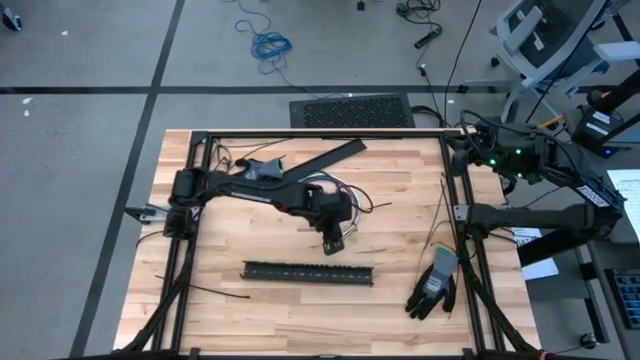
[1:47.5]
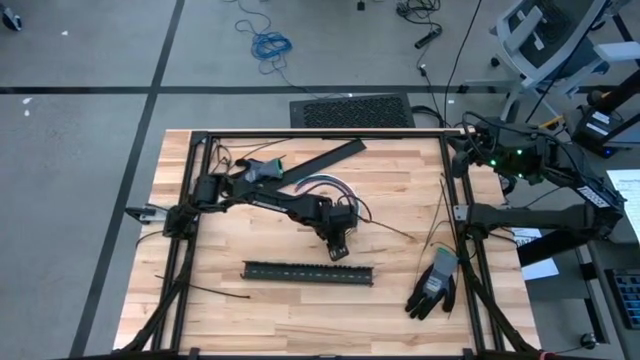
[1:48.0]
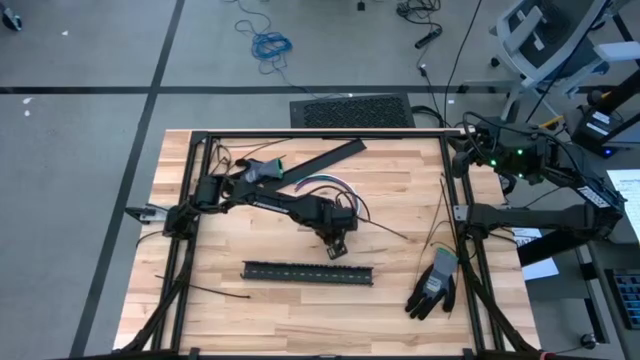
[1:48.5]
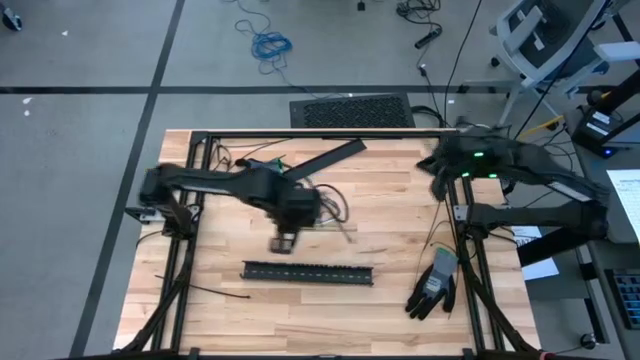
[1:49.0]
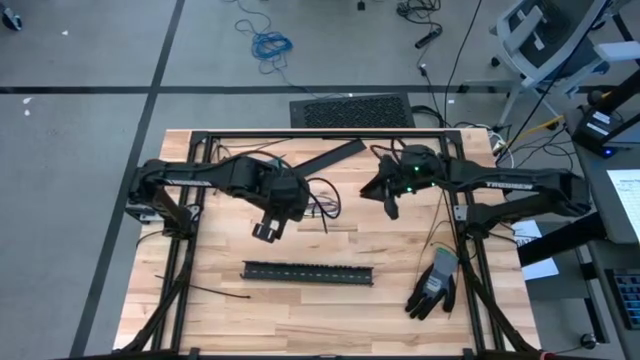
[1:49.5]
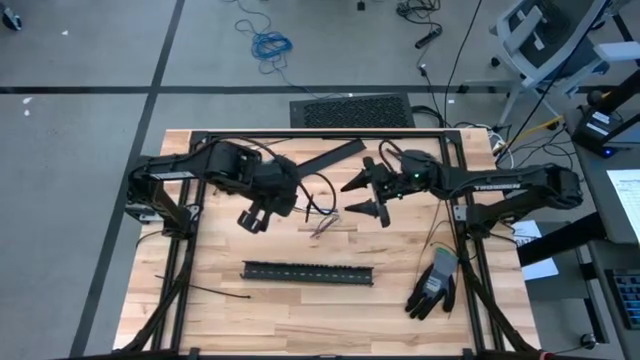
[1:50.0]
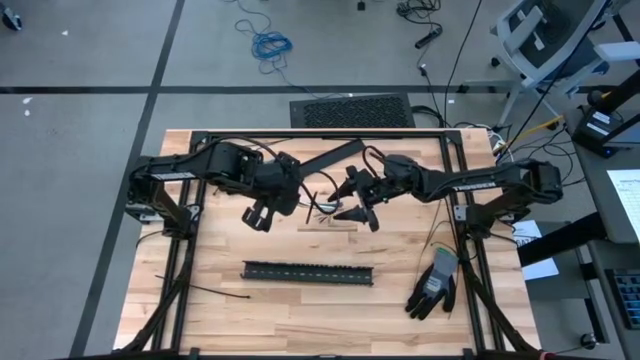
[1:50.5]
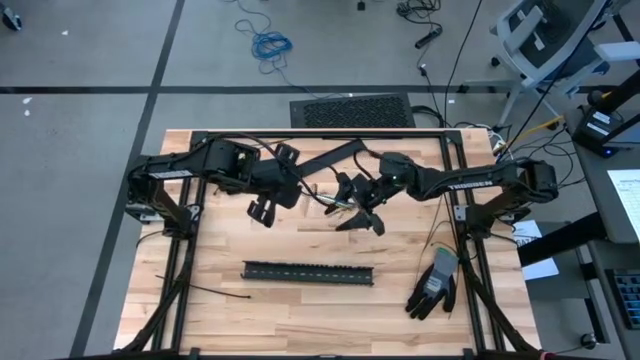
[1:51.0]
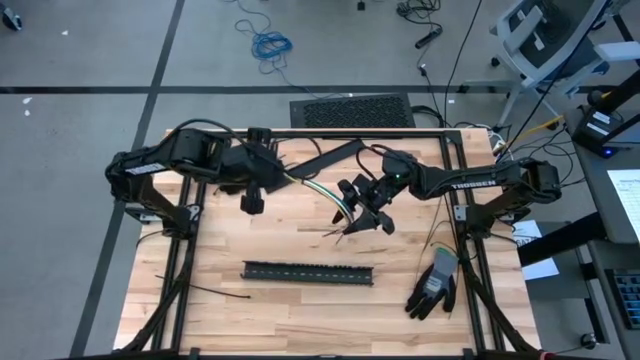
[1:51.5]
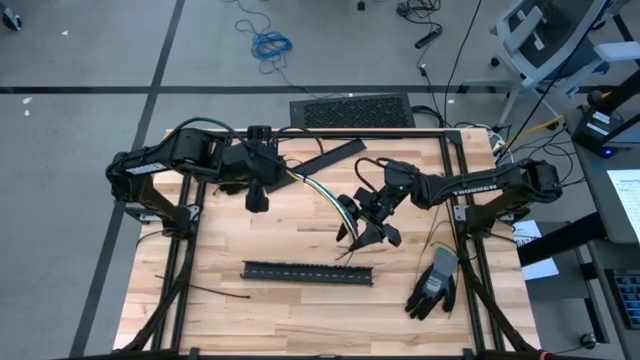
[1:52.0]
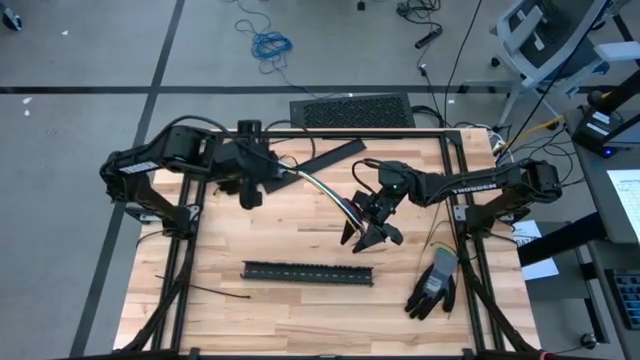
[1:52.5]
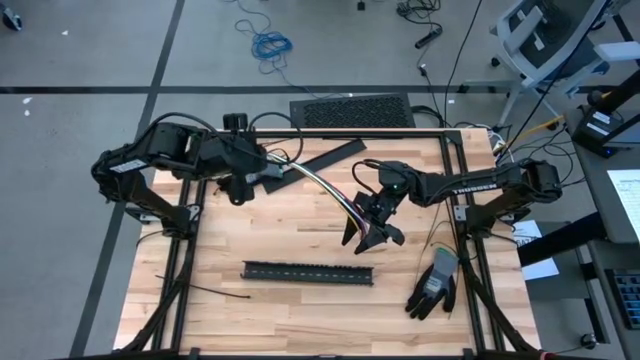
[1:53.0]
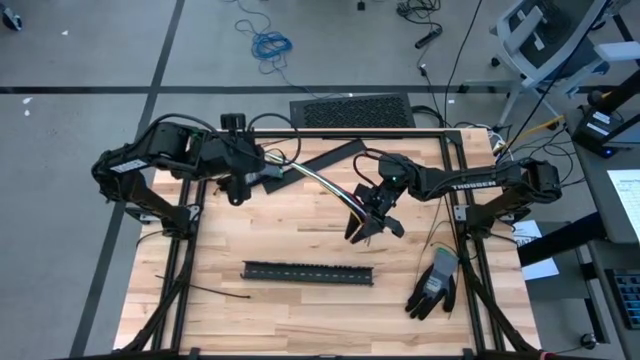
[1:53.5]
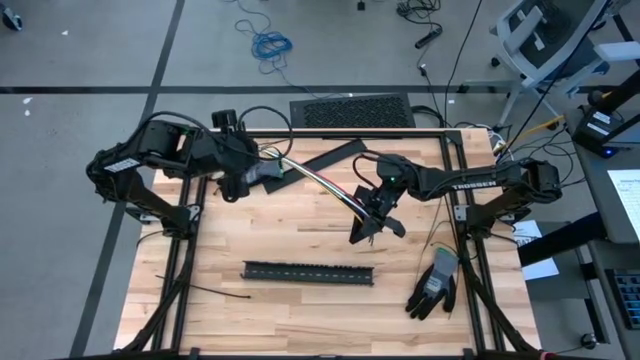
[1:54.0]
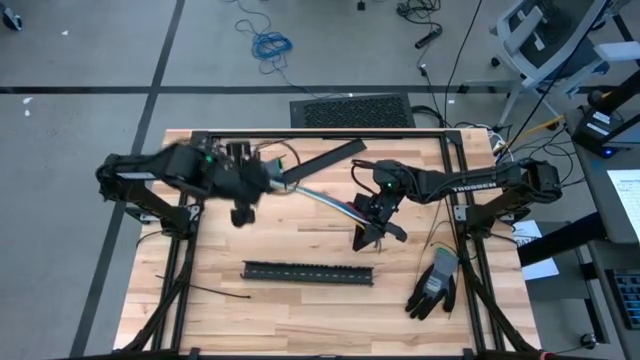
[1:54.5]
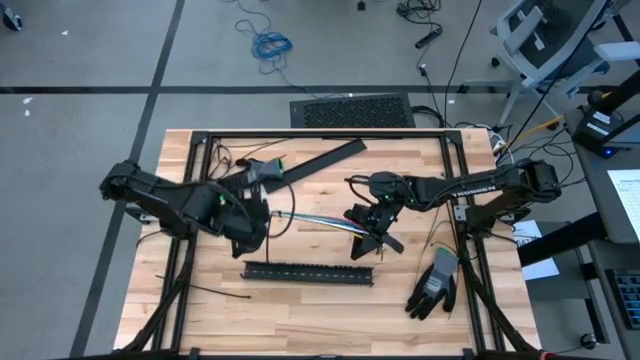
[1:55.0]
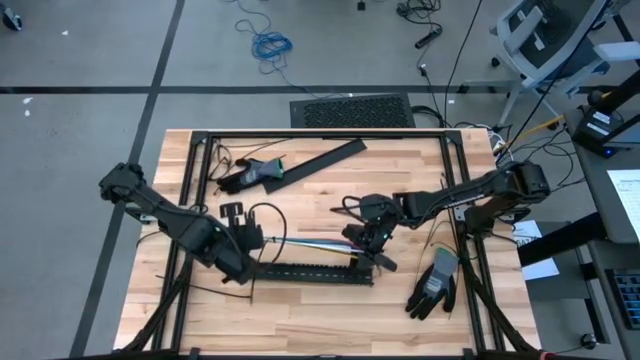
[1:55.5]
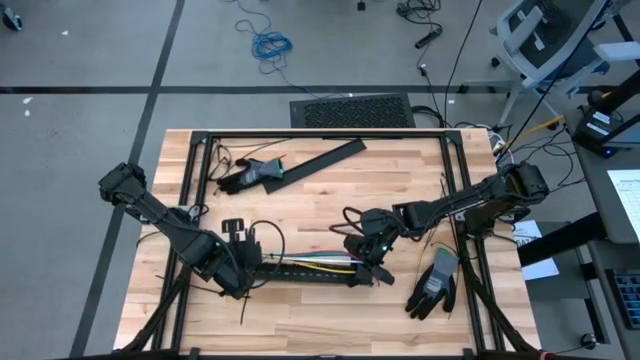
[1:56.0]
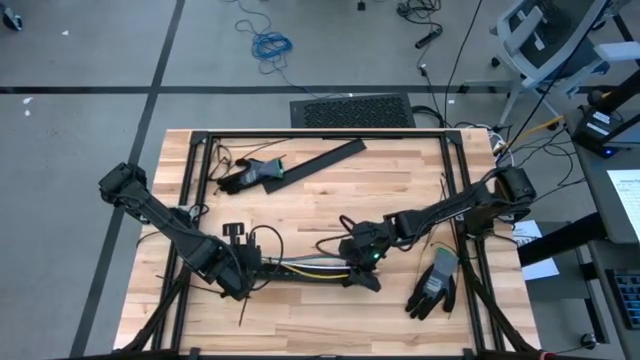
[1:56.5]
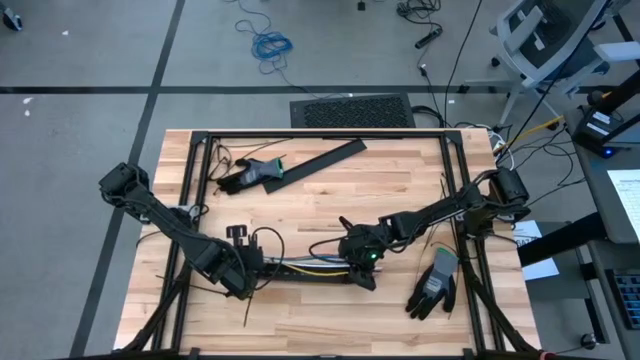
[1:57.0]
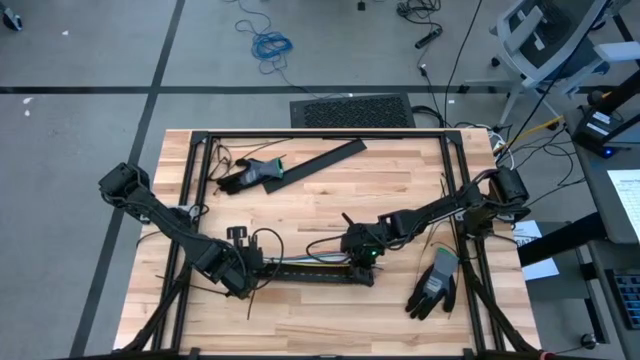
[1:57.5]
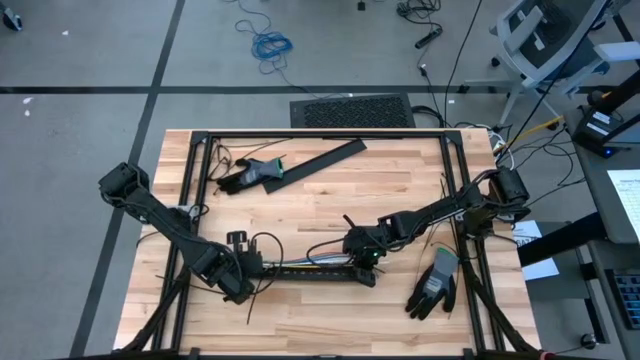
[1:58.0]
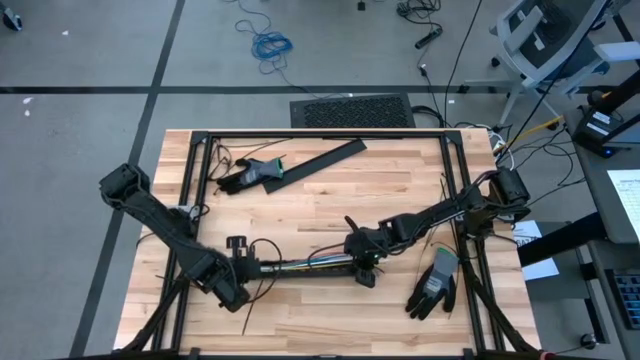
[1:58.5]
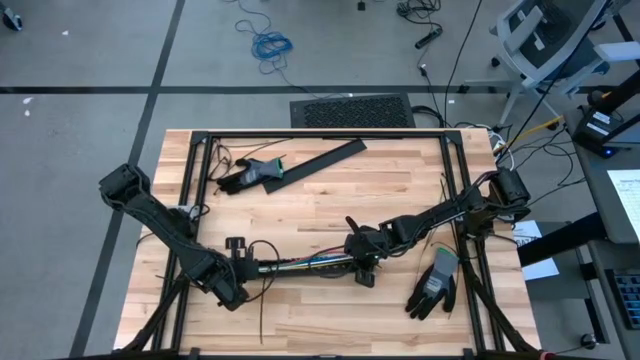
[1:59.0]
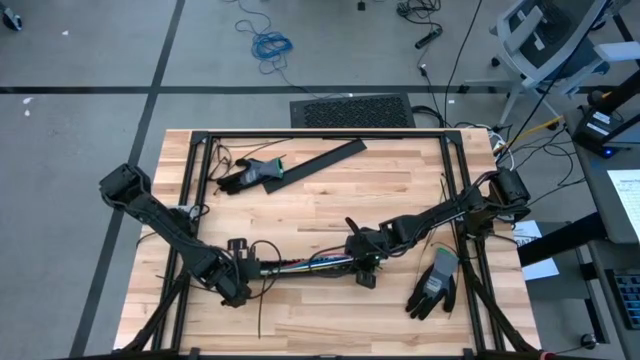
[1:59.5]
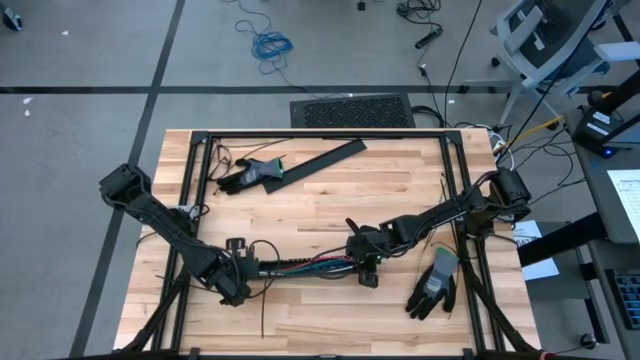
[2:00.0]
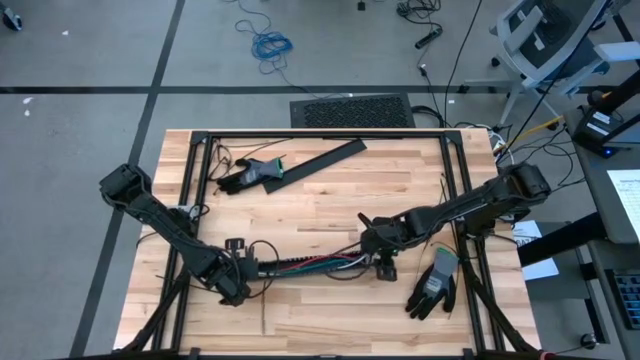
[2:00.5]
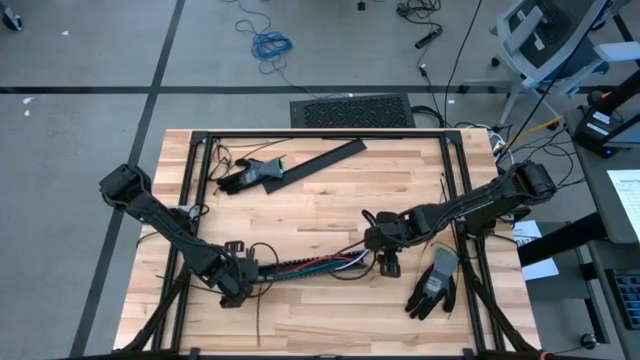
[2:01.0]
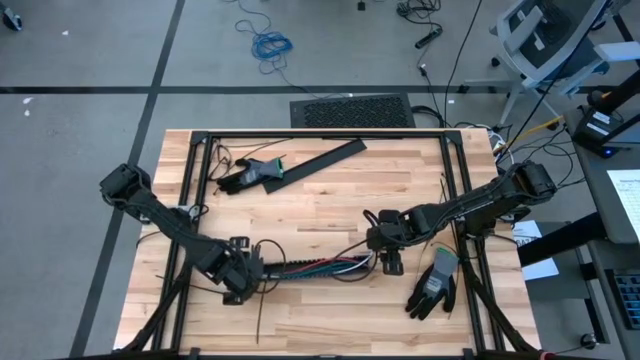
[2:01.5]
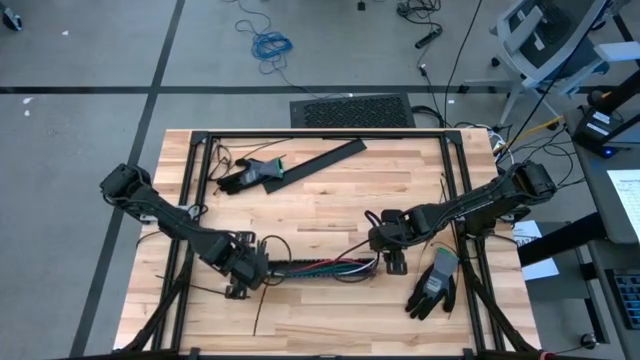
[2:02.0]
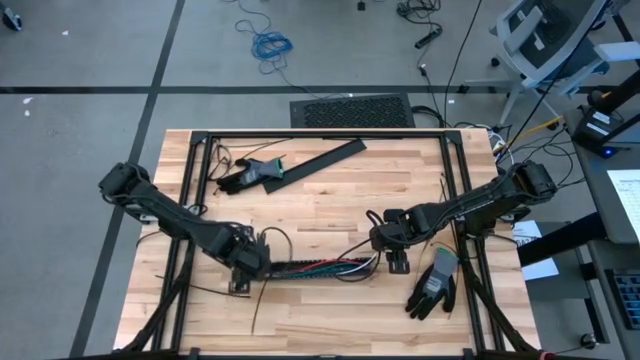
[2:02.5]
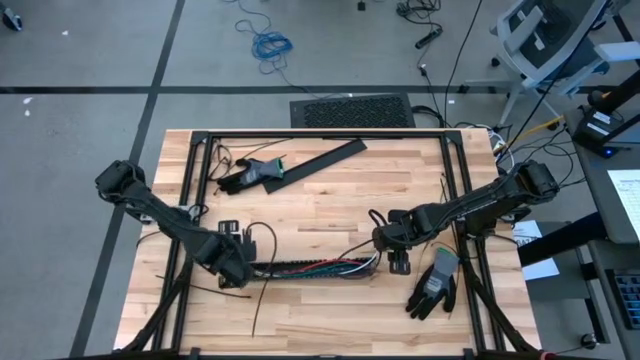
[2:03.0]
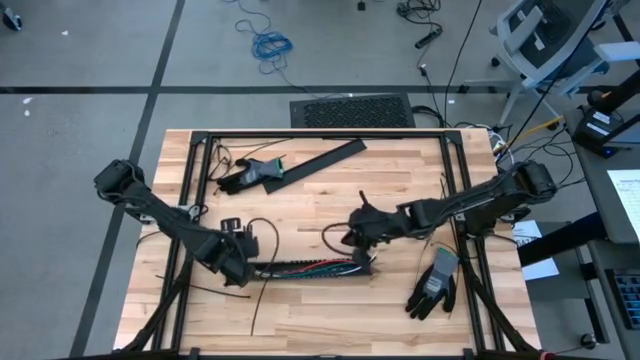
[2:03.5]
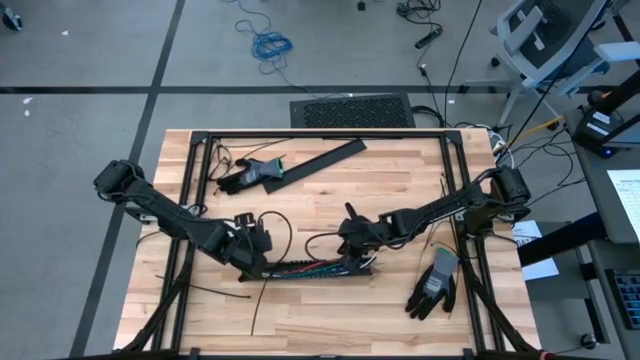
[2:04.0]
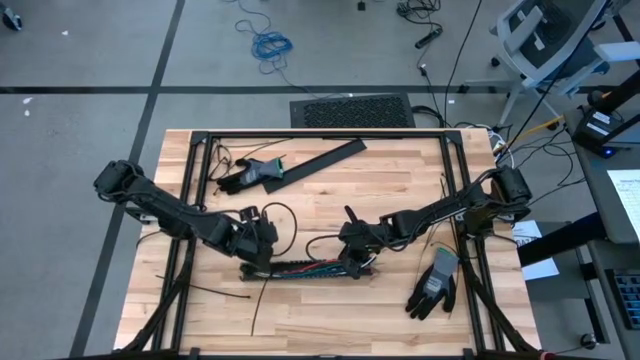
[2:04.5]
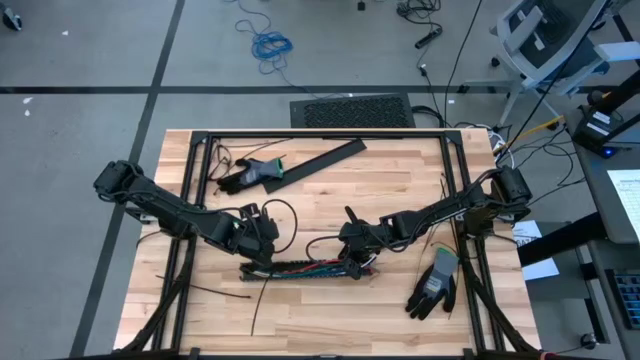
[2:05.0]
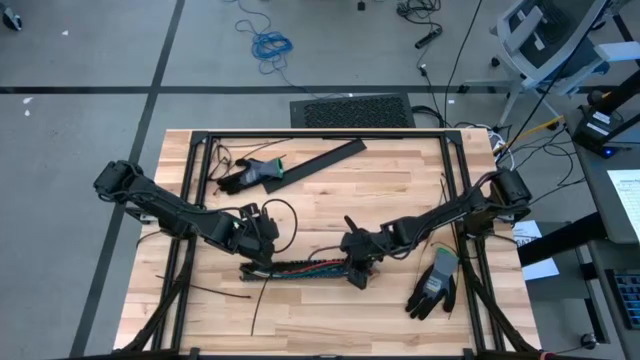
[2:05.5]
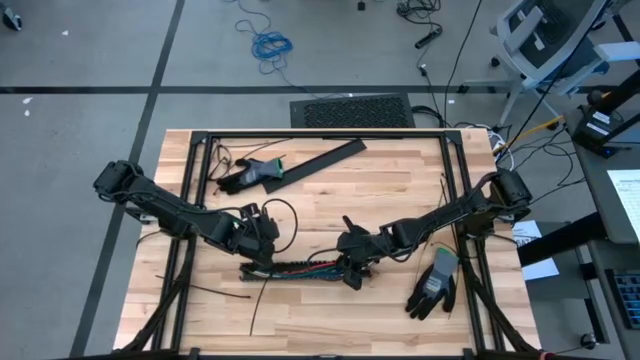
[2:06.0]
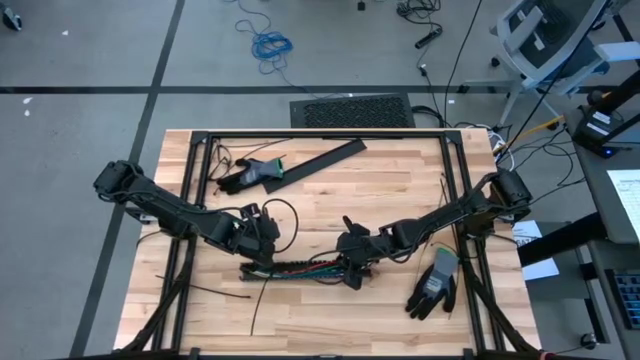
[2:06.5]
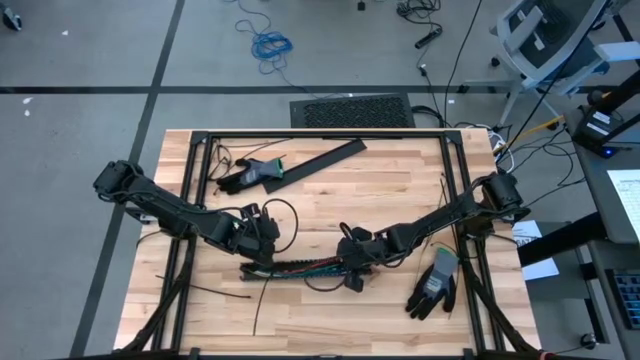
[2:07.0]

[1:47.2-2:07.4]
Task: Ziptie cables
Put the cable wires into the black cable duct

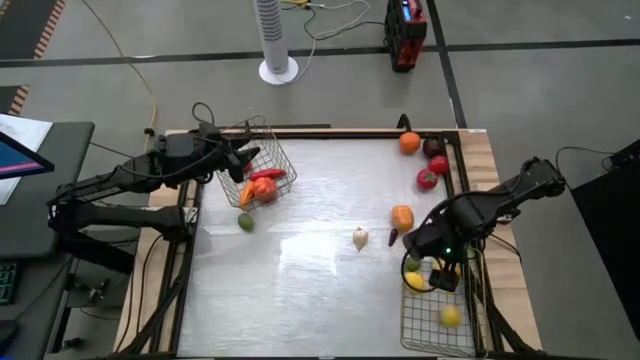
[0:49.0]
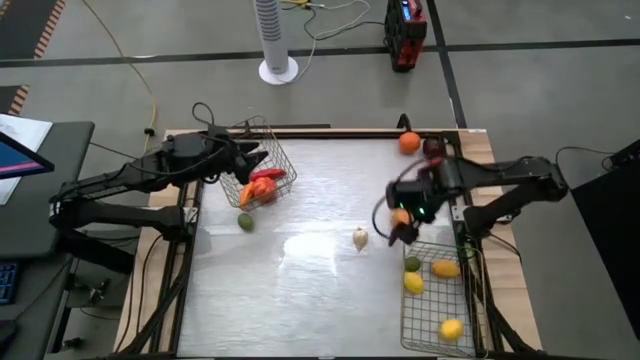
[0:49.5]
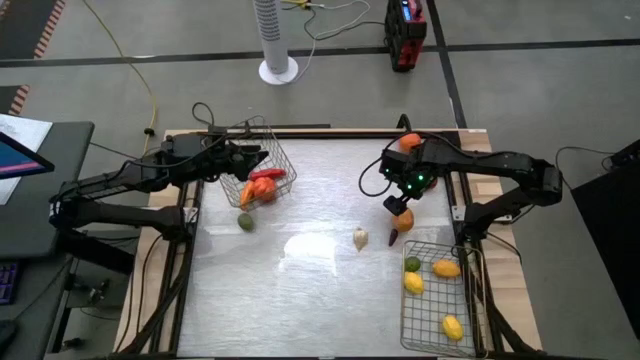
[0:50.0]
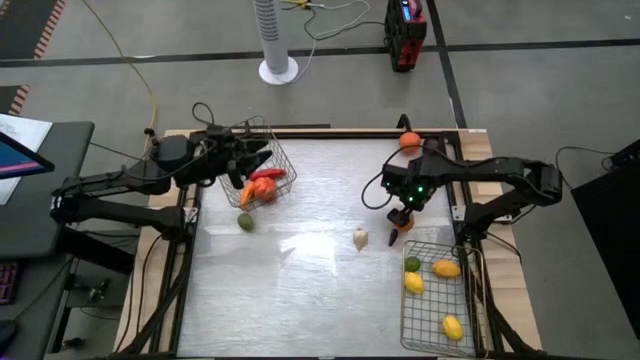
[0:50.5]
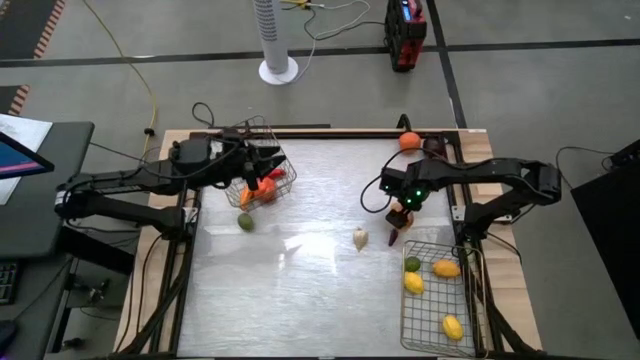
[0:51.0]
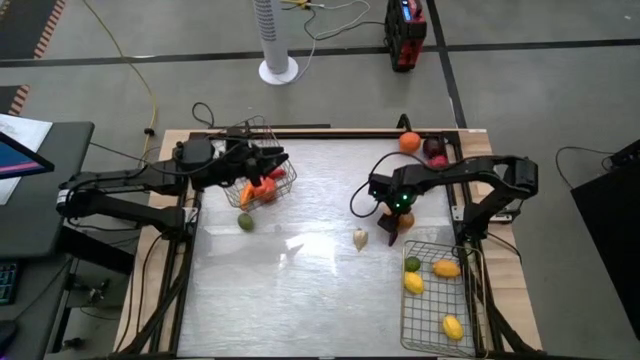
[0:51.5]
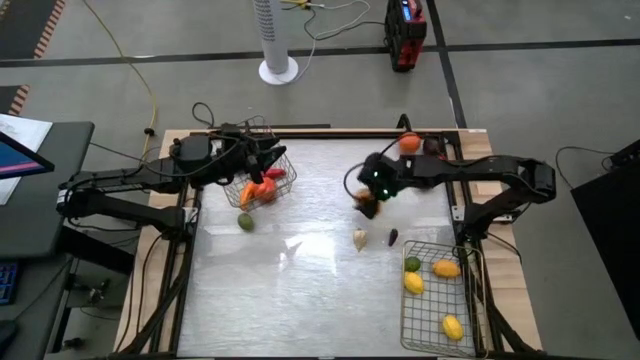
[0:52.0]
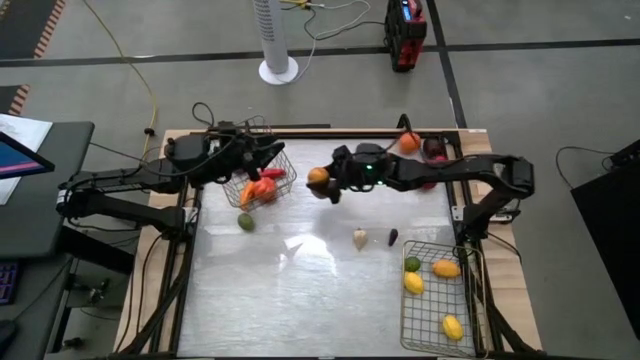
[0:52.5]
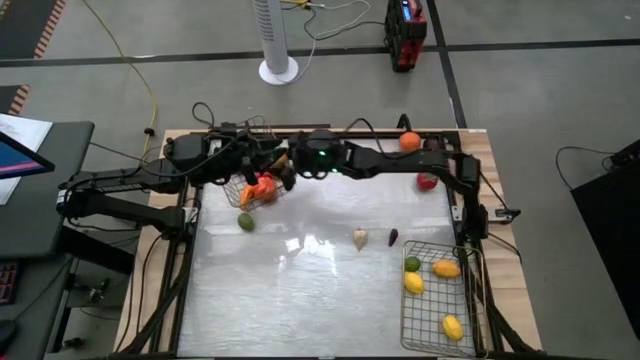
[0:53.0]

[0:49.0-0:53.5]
Task: Sort produce into baskets
Put the potato into the top wire basket
